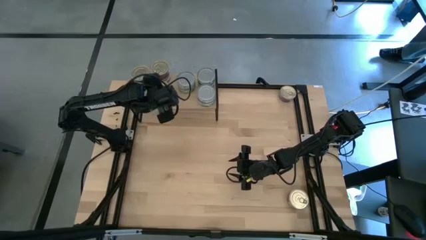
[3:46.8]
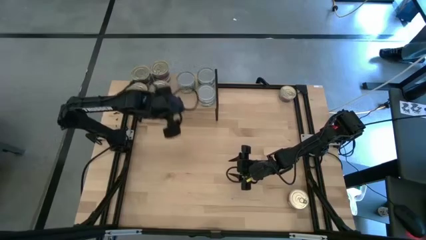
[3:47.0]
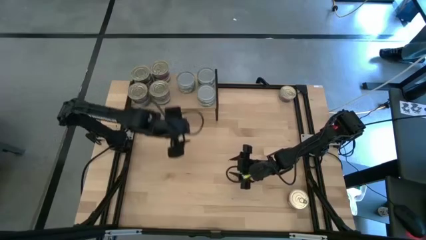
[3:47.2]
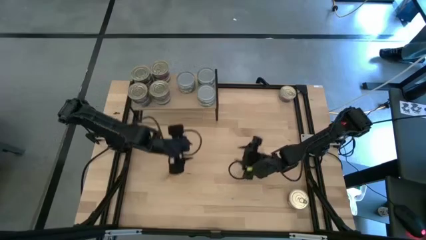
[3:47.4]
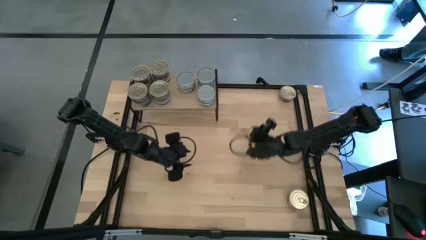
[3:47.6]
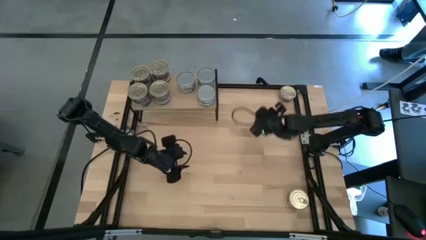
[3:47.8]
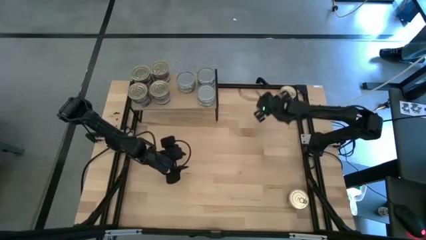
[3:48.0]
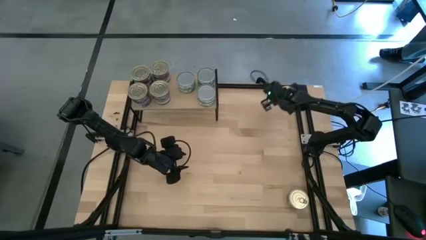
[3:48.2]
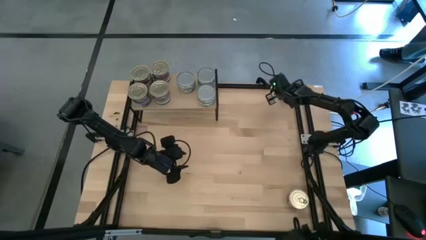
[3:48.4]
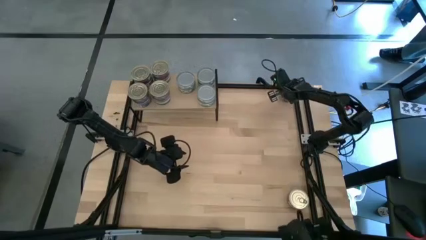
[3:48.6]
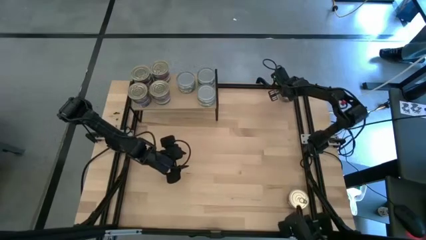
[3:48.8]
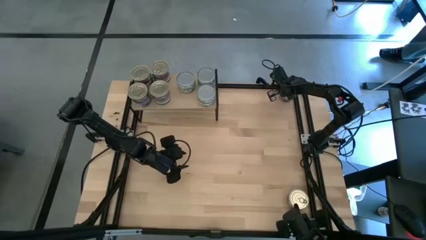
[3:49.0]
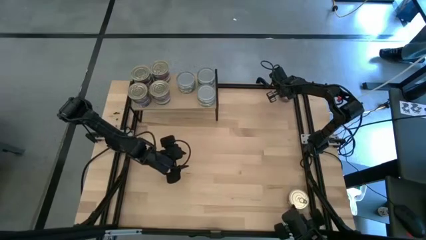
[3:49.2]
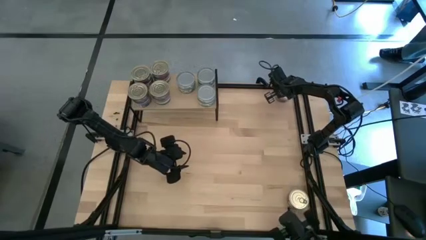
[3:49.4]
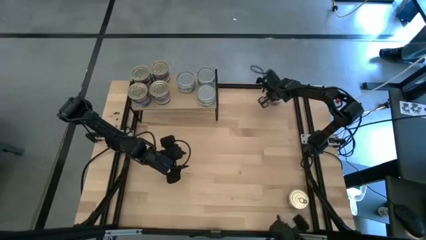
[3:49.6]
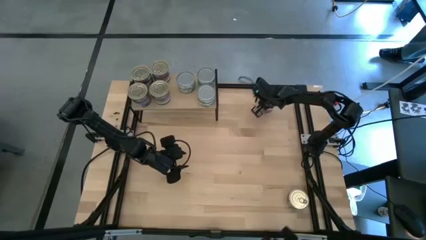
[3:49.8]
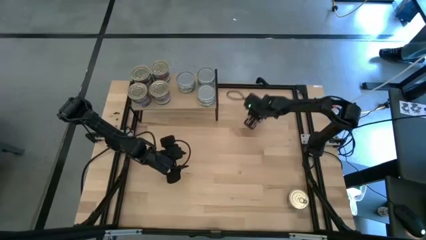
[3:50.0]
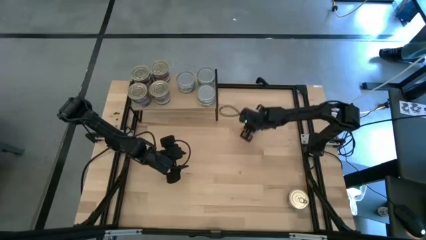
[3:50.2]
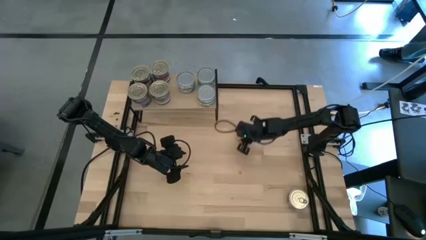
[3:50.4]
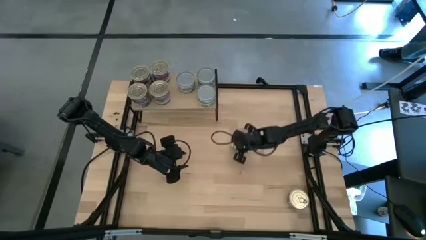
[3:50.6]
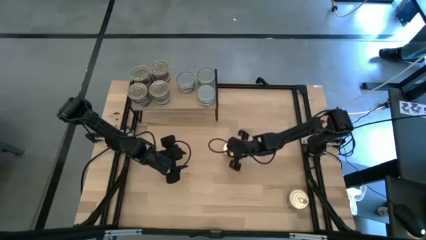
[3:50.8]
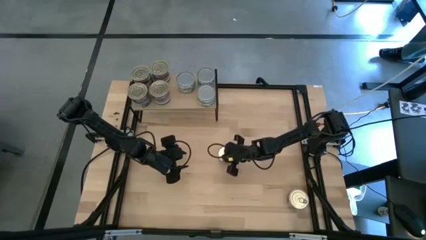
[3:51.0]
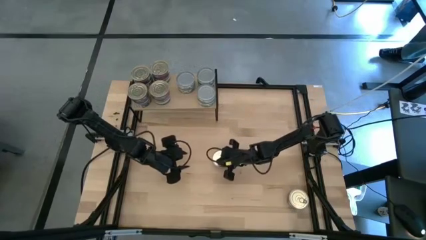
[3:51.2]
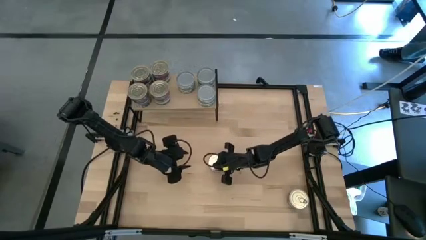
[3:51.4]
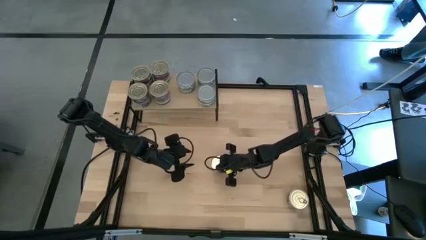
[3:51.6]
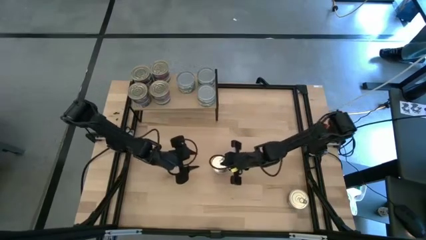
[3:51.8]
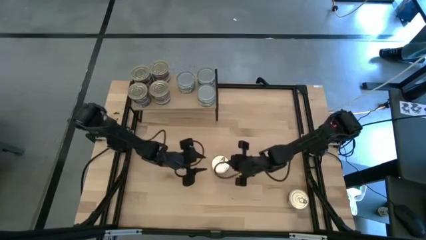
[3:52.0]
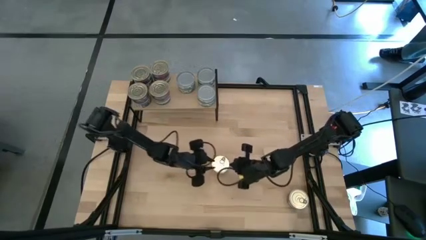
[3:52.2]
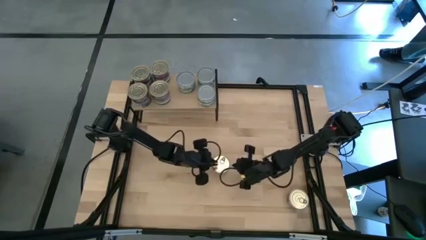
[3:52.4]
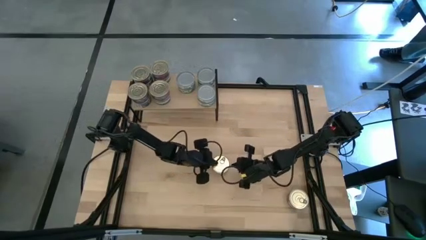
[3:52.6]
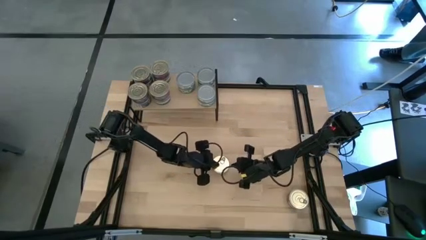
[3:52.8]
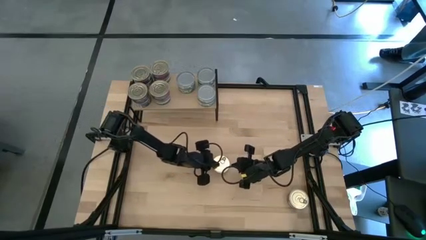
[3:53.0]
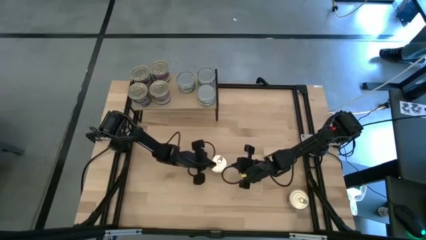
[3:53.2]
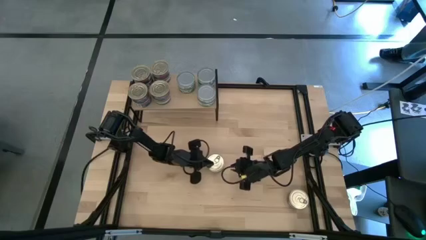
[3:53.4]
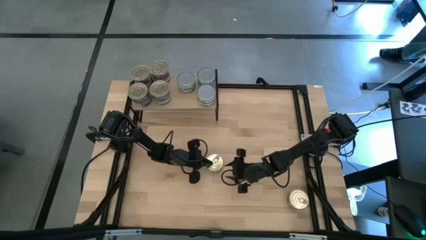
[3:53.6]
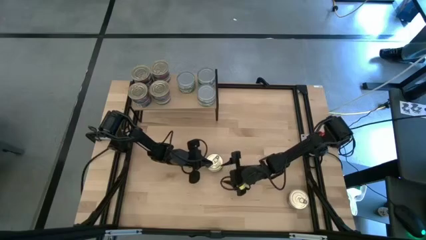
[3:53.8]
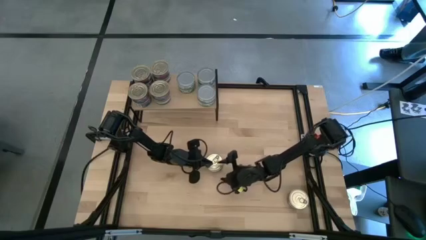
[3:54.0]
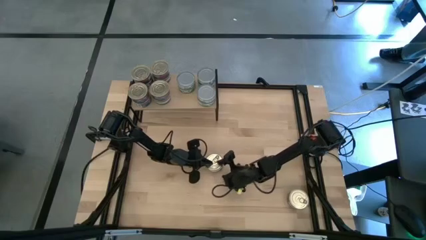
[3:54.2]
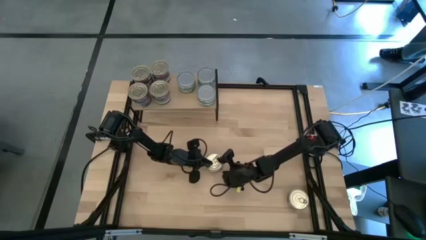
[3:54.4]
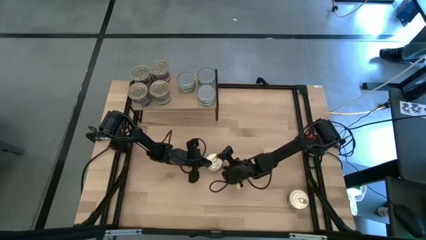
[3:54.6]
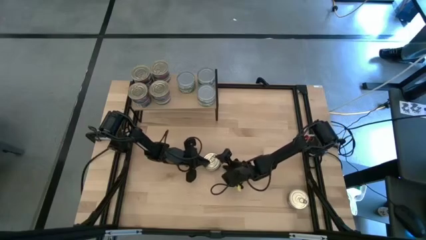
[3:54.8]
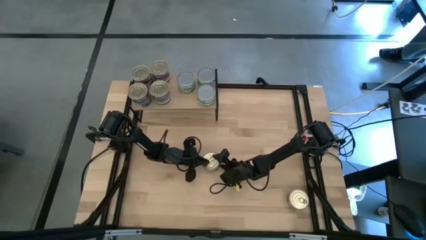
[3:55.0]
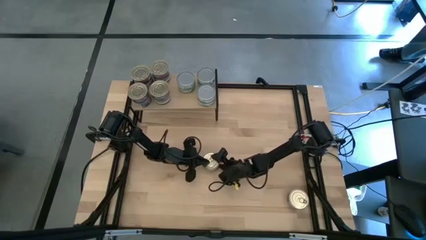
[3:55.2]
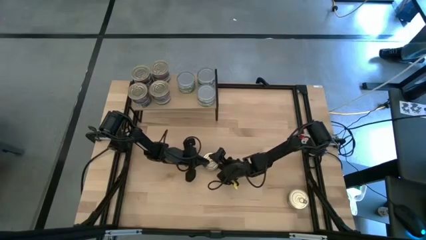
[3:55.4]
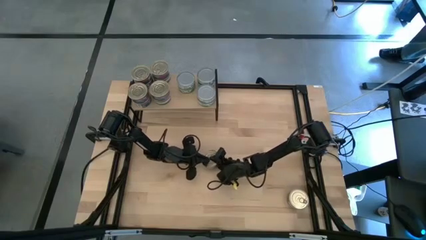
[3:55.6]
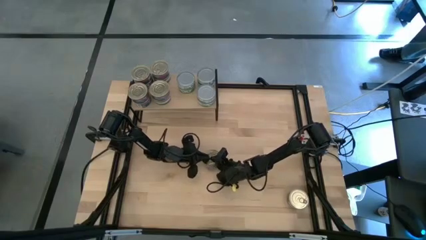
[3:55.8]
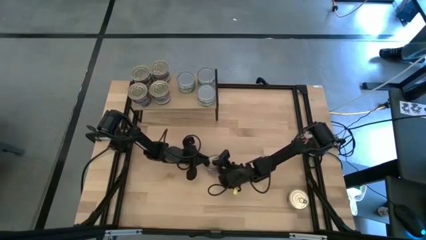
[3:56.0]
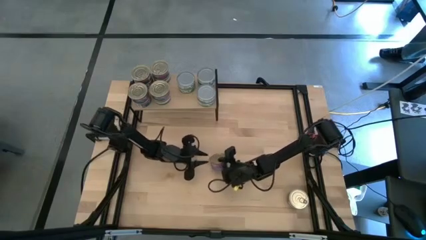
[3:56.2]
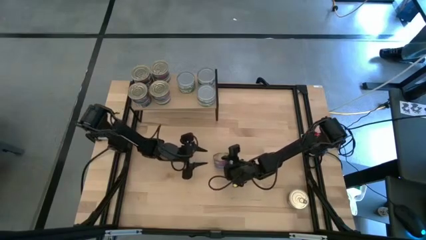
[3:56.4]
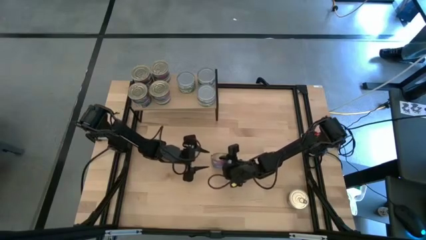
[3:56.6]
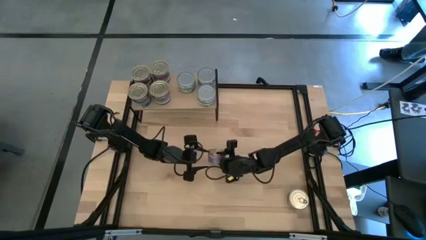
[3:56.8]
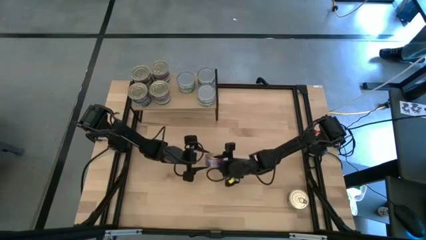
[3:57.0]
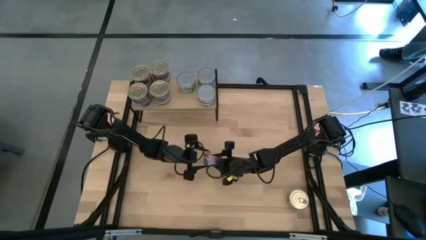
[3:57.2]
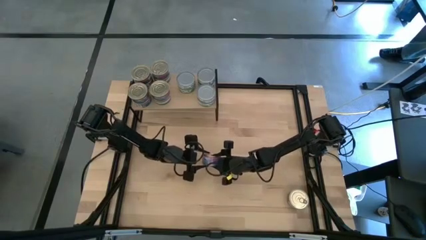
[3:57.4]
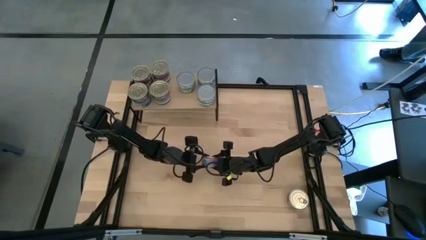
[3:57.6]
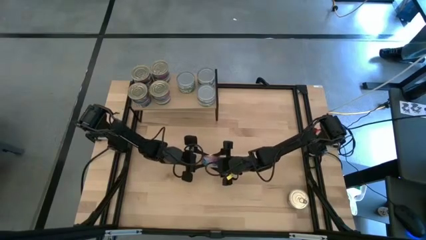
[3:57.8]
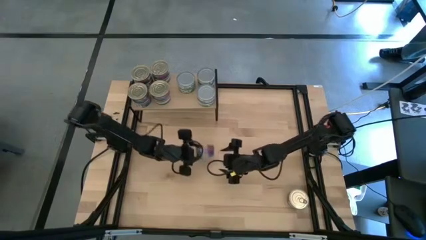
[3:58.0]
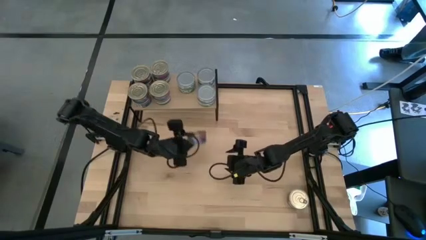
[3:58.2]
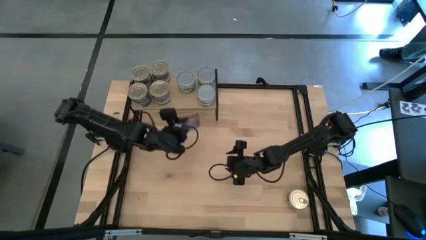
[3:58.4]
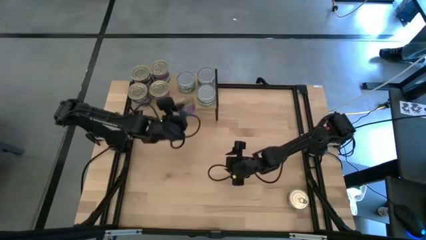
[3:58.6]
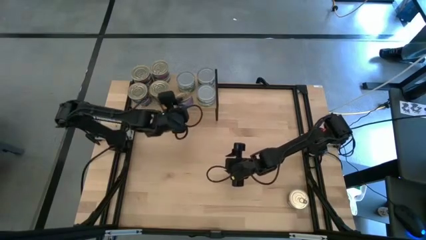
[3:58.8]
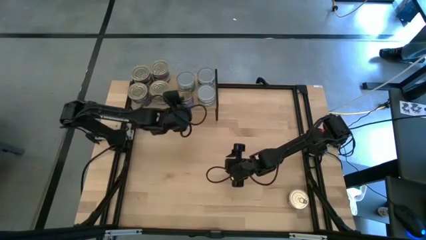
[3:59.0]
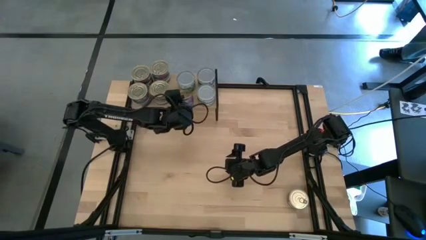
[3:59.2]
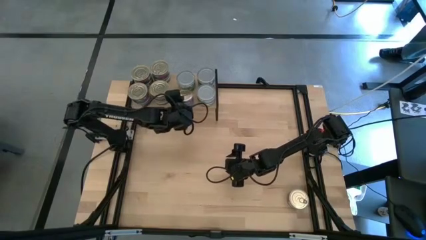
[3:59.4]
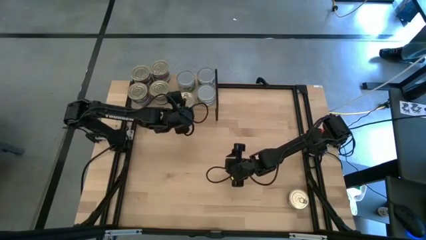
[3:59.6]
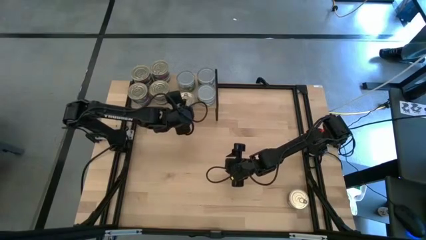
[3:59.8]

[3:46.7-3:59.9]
Task: Stack canned seafood by type on shelf
Put the blue tuna can on the shelf
